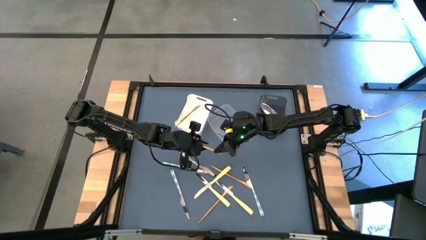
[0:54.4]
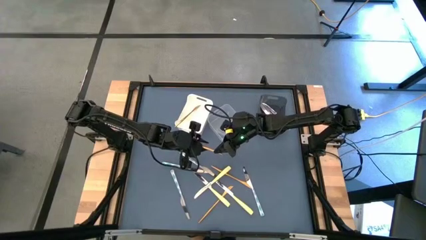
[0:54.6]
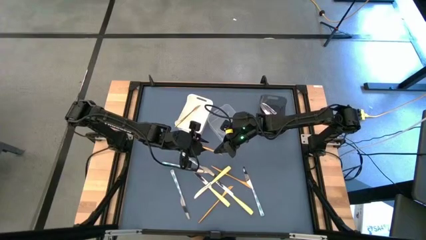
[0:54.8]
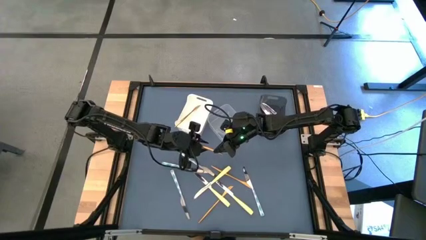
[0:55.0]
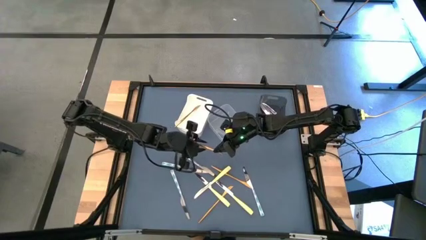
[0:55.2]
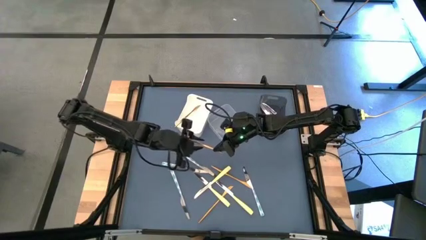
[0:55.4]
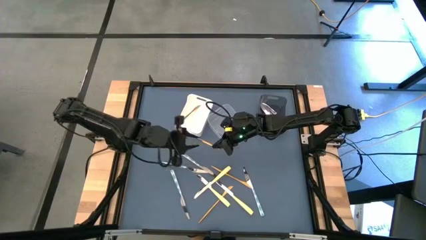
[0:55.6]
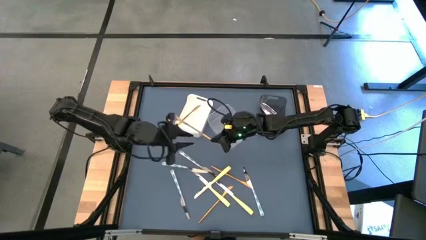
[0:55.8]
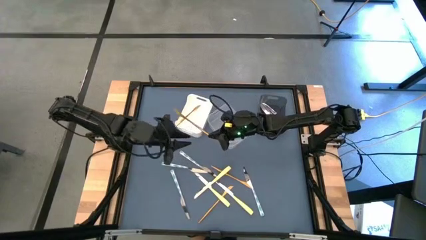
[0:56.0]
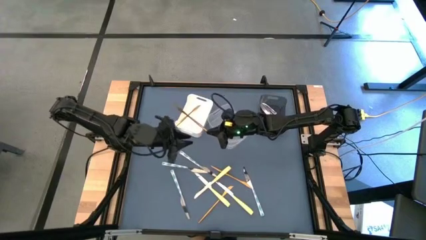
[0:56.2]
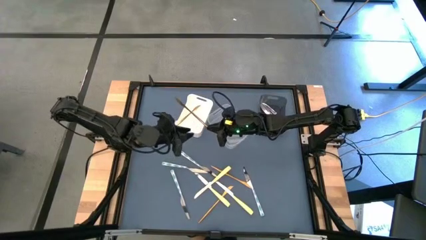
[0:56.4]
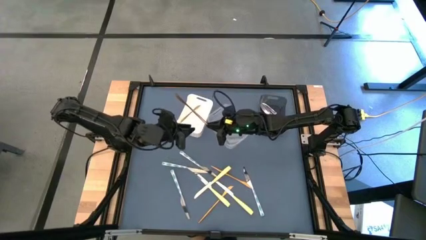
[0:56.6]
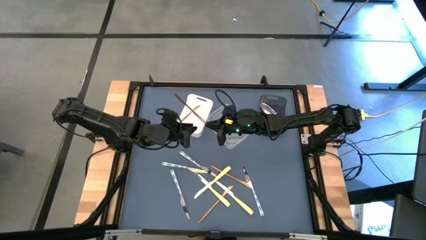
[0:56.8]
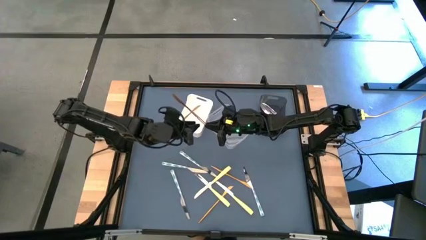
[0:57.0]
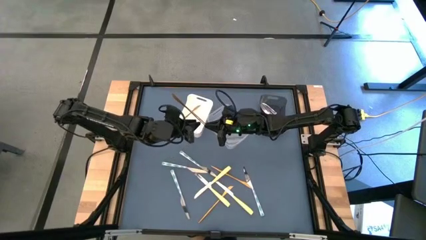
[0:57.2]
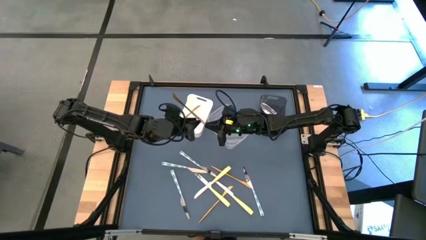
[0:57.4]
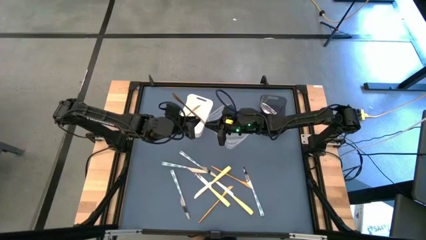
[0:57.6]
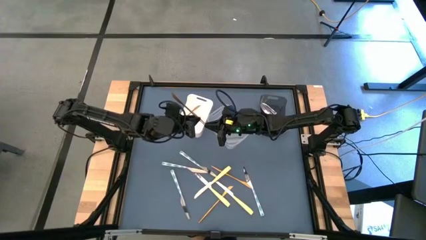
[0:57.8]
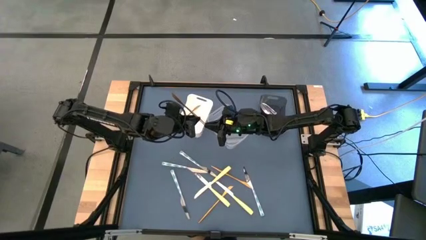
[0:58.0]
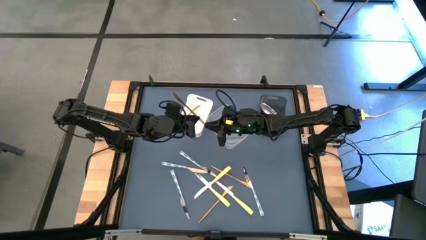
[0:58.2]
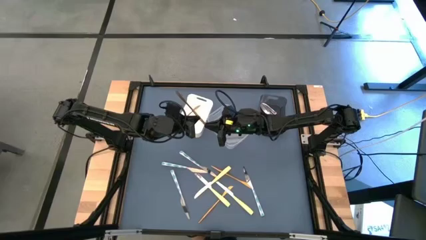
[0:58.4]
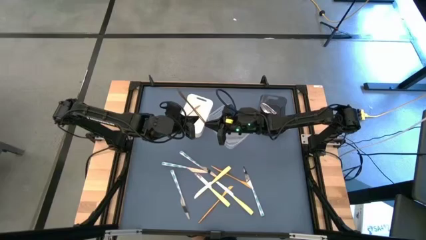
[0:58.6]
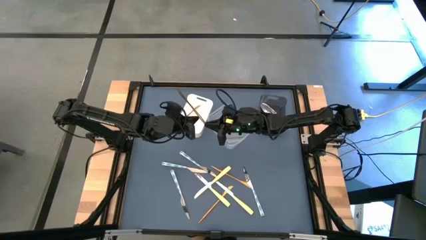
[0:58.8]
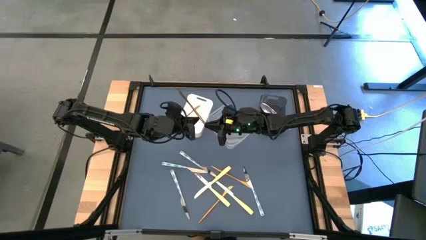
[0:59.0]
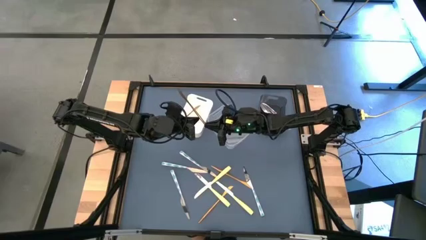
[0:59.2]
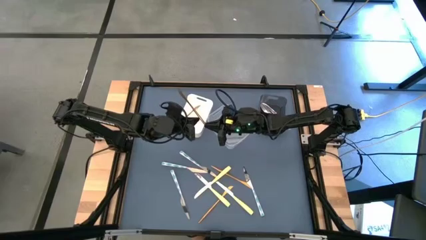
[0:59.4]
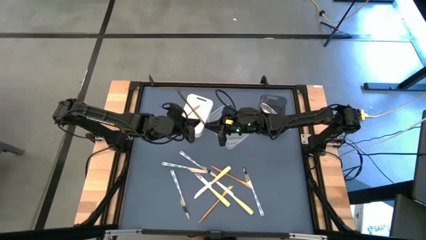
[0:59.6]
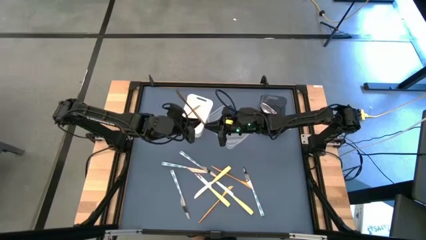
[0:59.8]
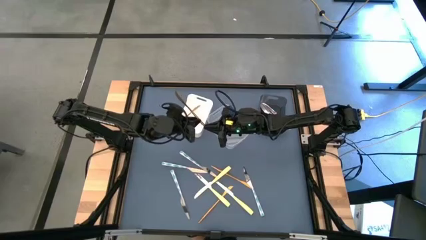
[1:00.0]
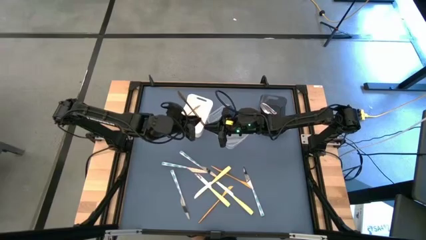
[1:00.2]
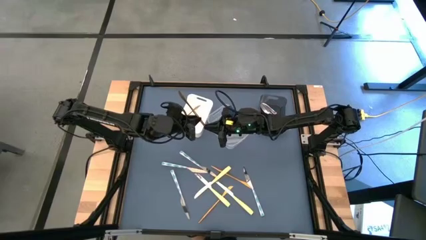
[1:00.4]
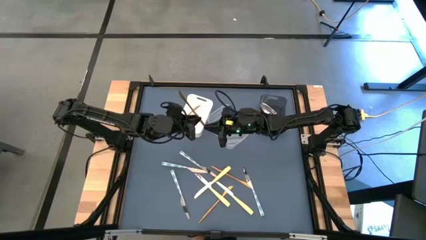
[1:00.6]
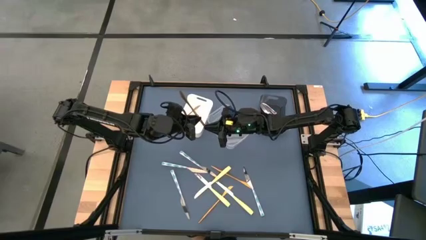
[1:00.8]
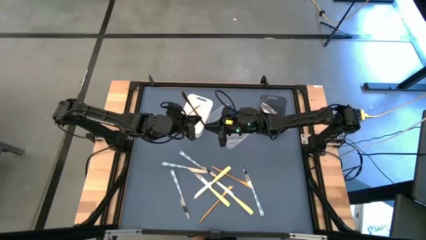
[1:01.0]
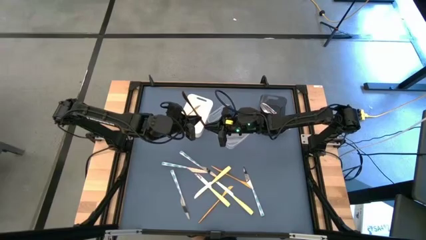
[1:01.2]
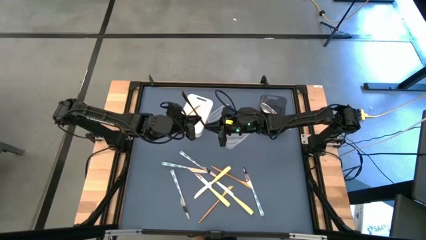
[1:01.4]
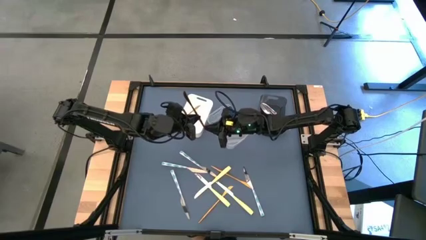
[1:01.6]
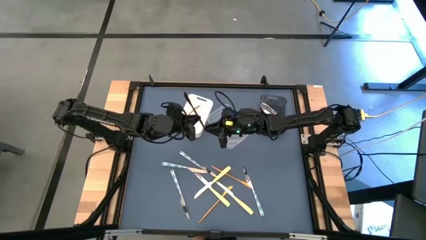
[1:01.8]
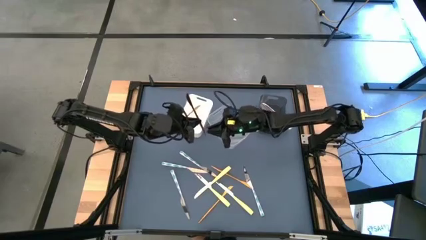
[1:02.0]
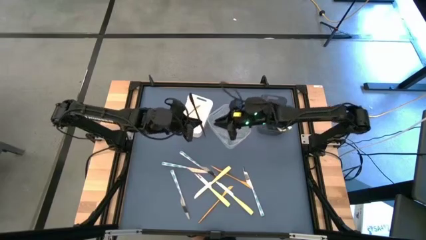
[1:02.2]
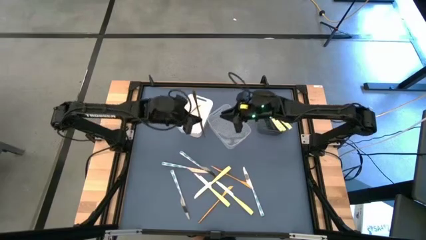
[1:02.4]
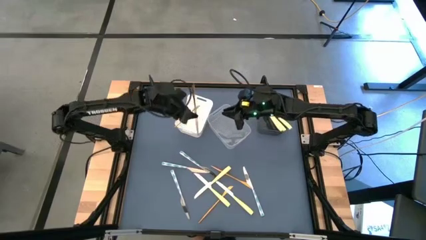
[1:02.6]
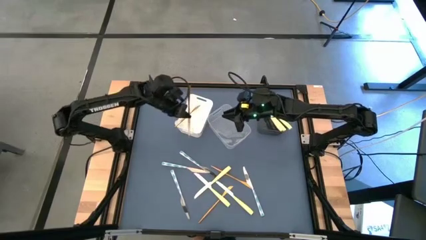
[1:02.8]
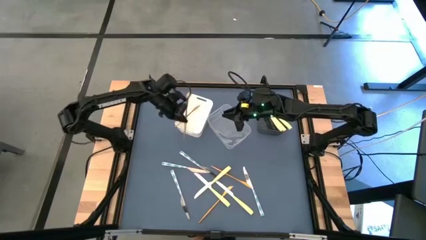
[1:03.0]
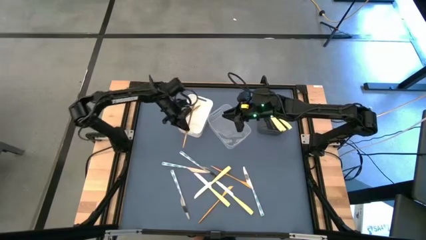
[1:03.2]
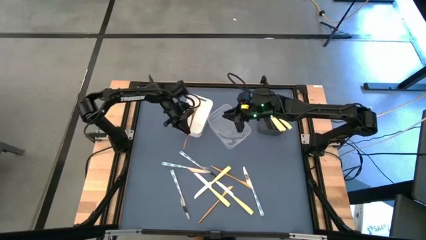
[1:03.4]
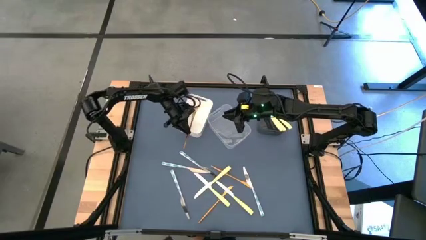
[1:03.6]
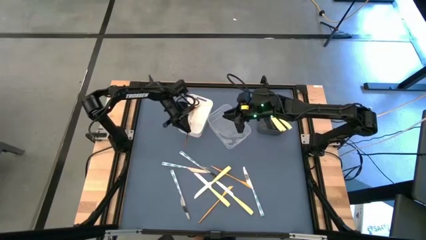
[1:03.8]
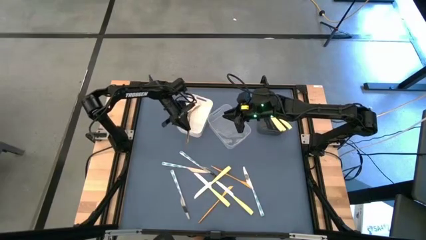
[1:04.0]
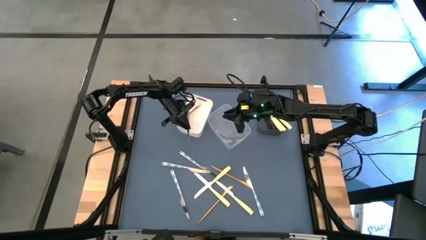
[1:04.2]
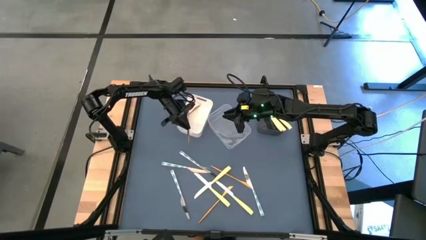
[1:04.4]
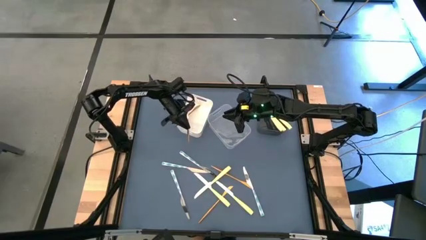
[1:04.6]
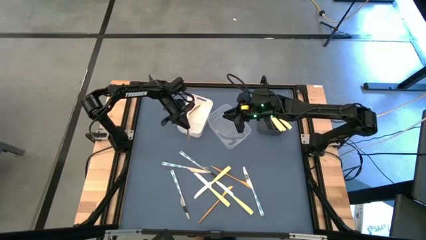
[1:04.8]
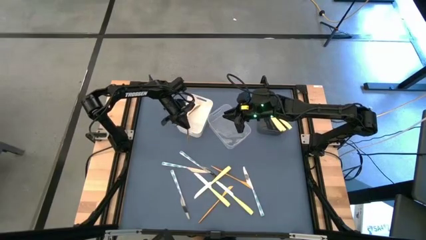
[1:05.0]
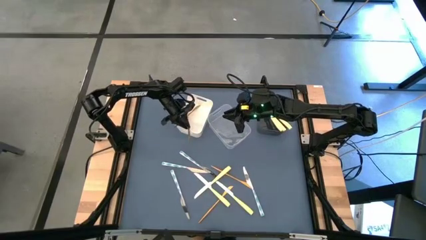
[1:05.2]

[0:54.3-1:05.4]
Task: Sort silverware by color (type)
Put the gold knife into the white bin
